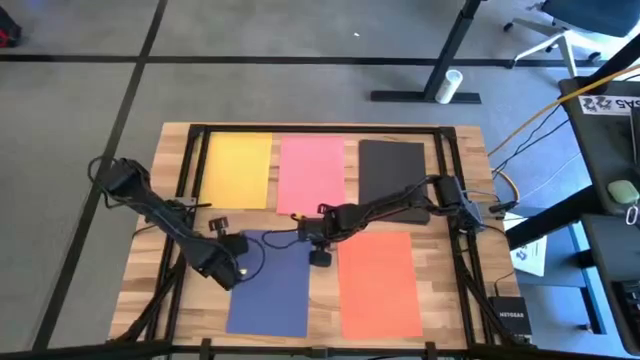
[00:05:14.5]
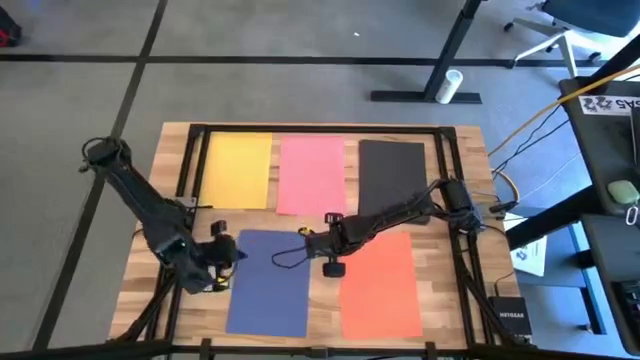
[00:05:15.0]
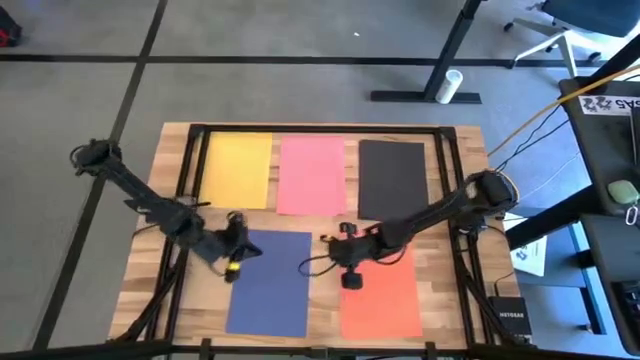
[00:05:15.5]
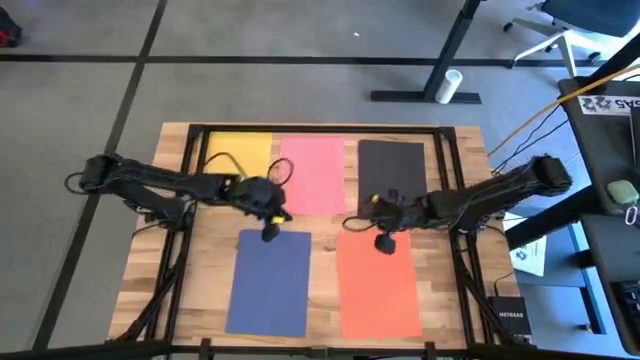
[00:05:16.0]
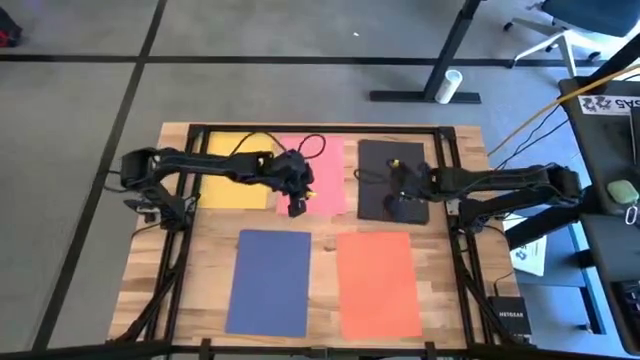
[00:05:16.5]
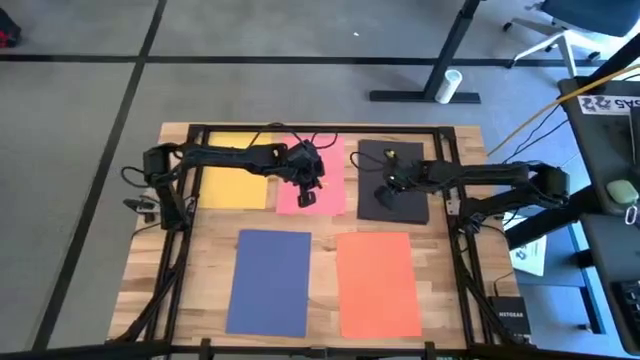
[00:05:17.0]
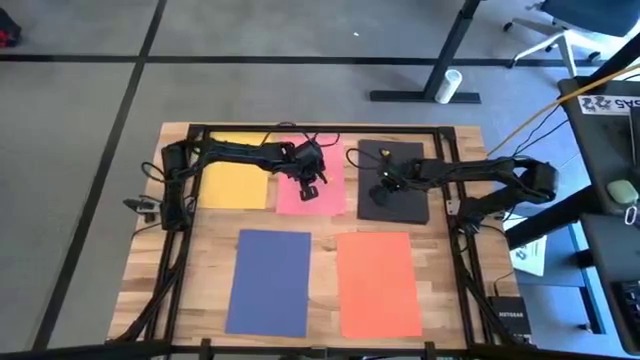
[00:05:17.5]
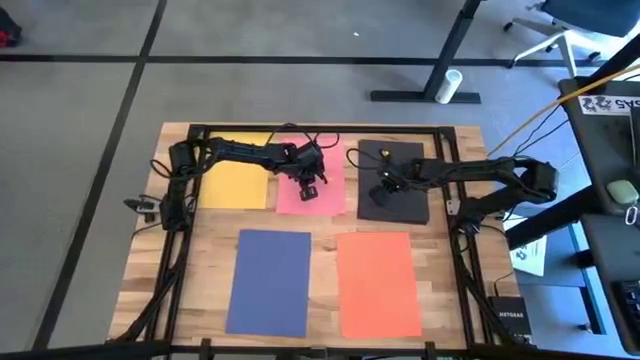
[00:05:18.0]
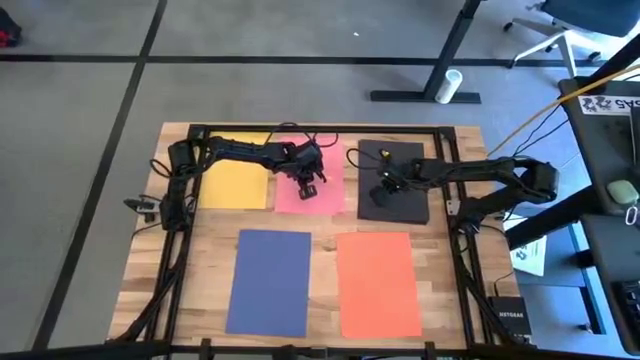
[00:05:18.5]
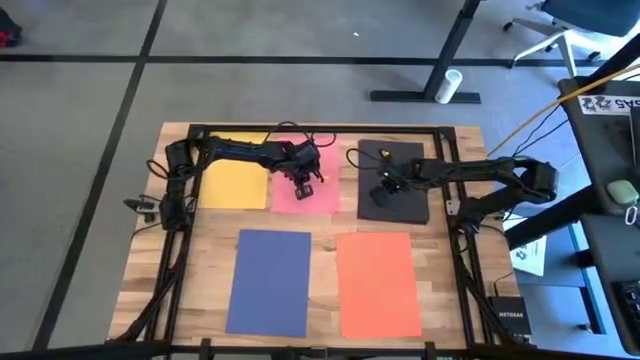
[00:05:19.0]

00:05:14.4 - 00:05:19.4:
Task: Organize paper
Adjust the stacked pink papers

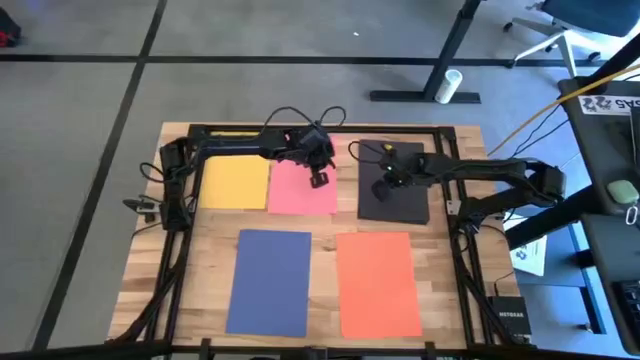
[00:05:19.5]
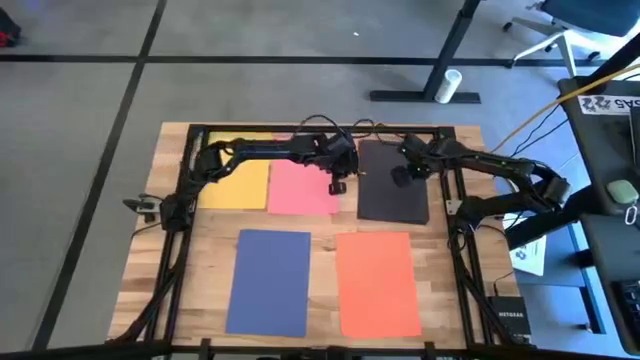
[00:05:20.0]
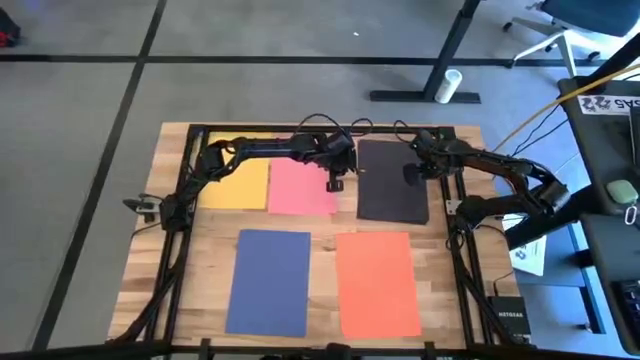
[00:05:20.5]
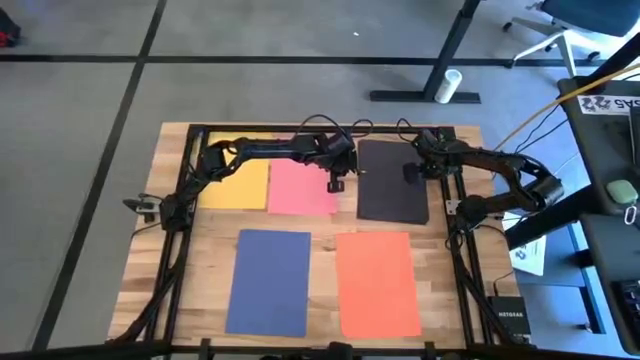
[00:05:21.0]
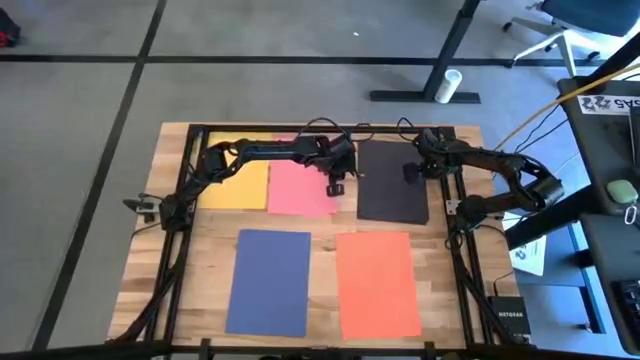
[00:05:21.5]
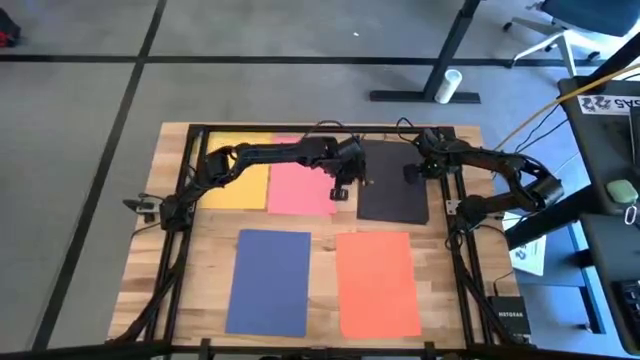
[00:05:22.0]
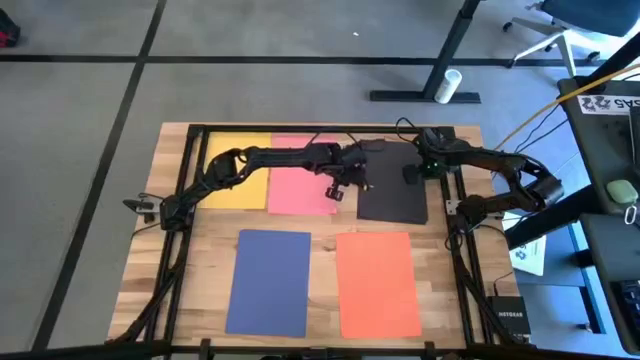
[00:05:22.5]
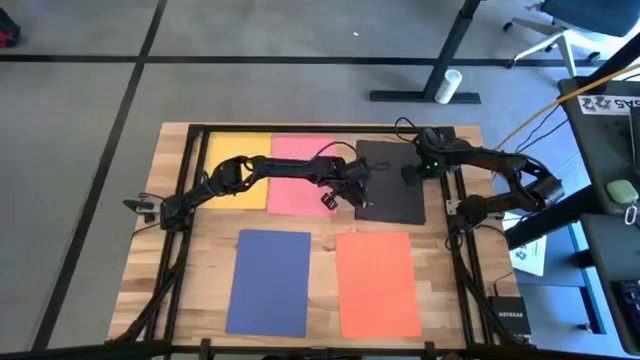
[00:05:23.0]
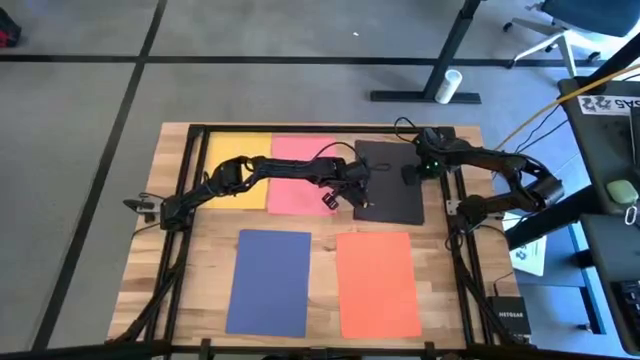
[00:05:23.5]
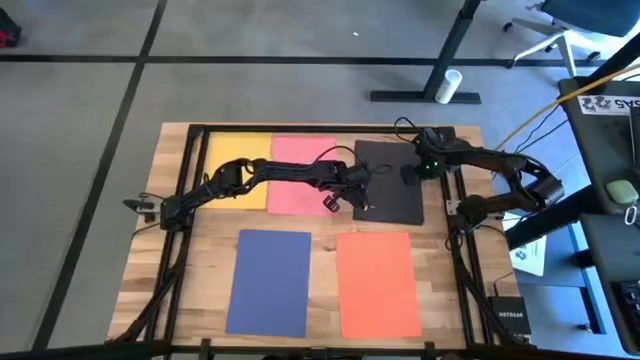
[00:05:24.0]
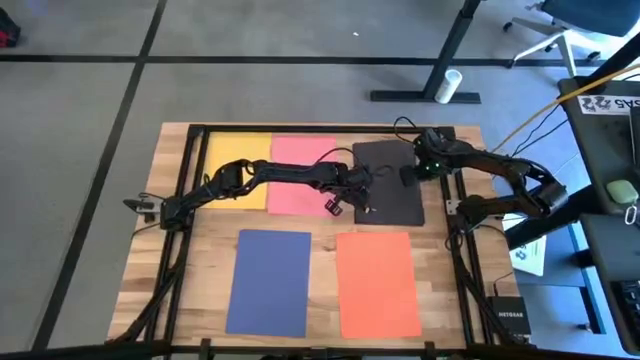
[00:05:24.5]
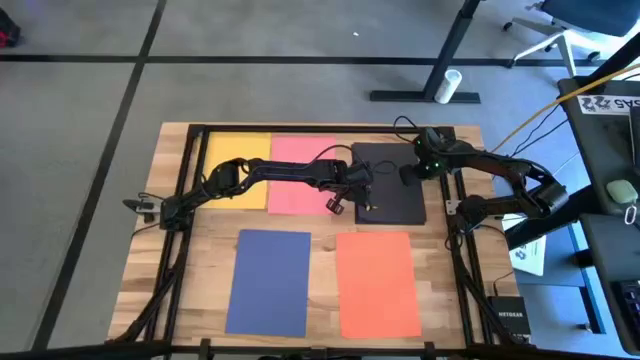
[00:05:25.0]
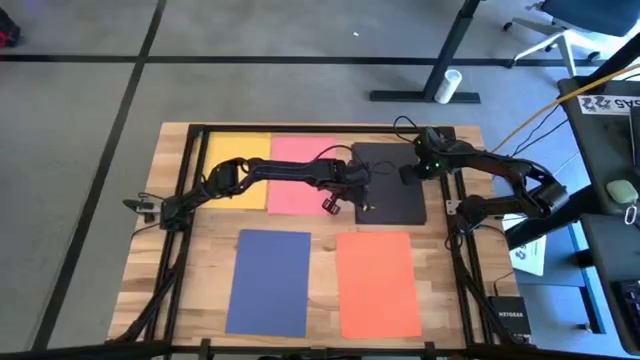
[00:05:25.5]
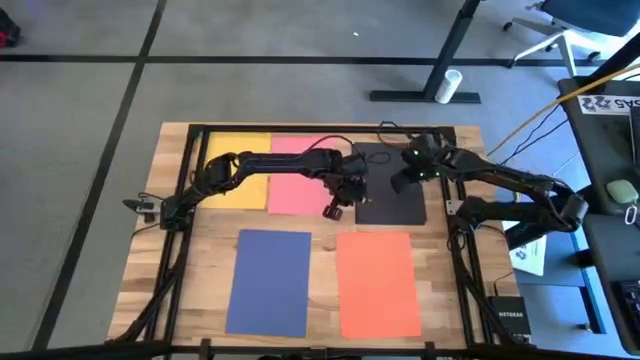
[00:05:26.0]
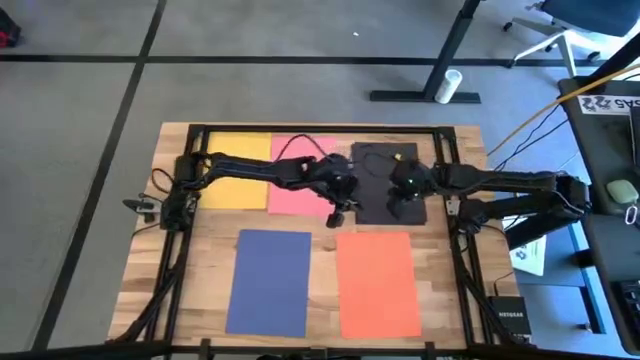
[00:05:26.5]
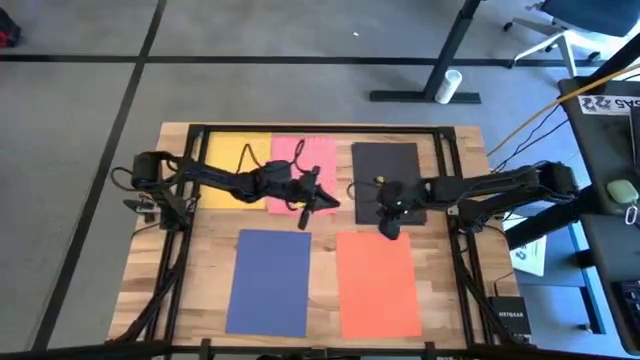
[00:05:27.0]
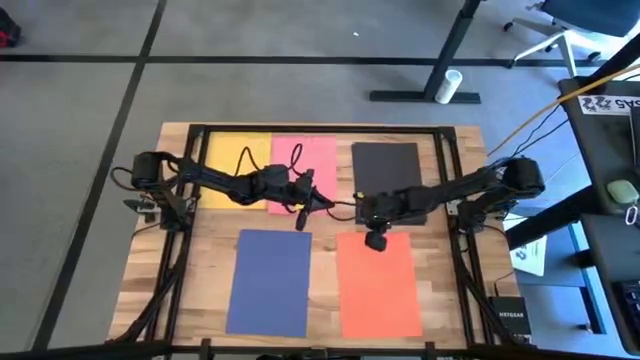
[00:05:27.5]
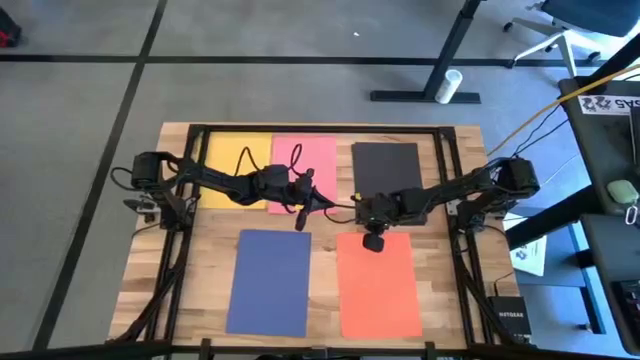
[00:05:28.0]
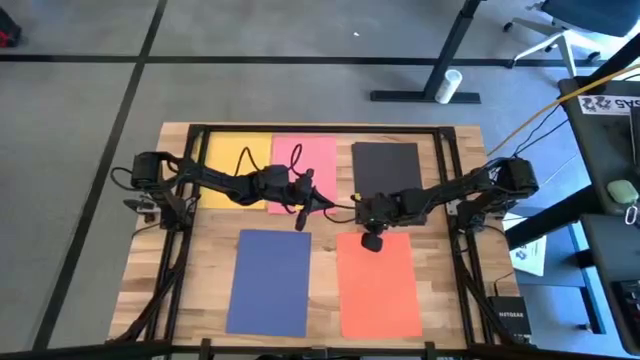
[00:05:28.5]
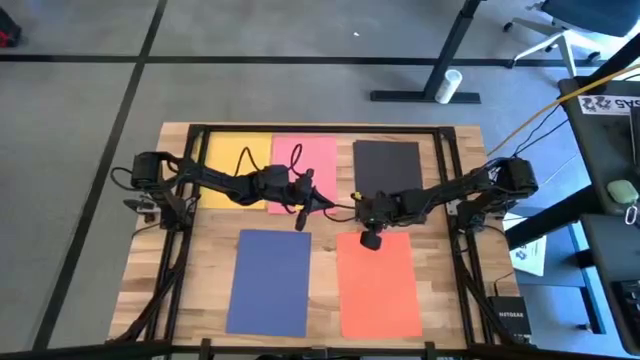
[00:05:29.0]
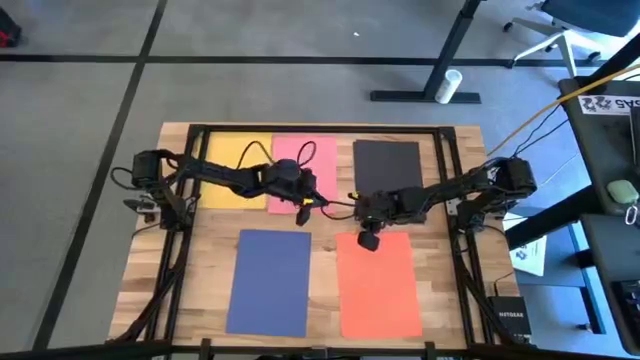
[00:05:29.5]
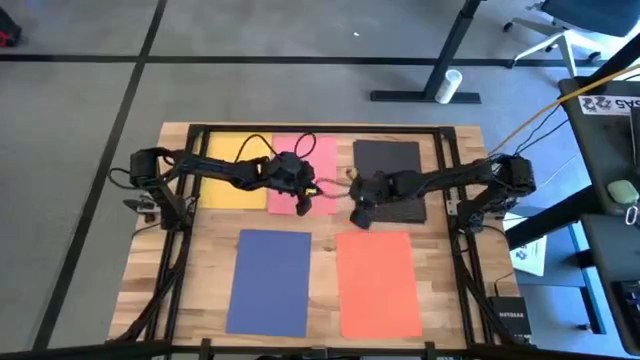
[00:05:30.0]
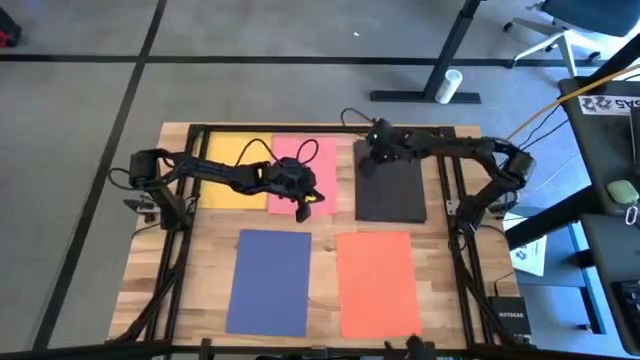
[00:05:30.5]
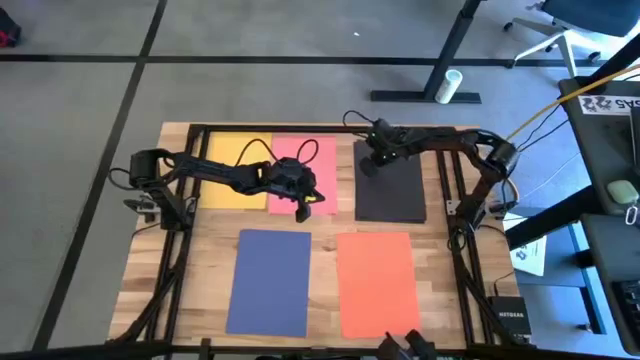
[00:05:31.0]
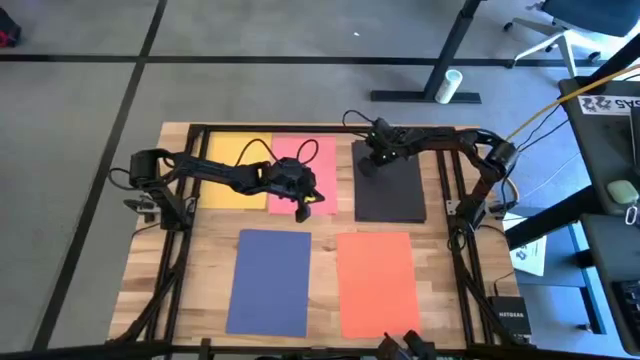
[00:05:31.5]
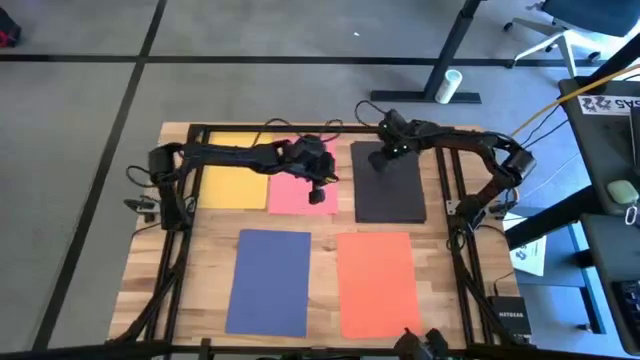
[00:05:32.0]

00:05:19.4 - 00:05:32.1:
Adjust the stacked black papers
